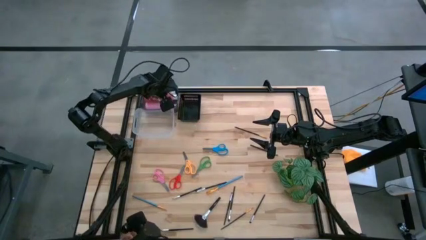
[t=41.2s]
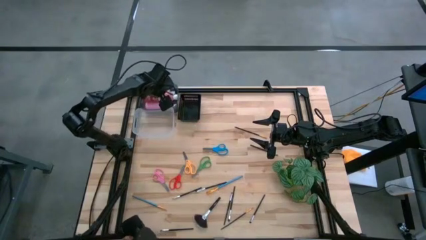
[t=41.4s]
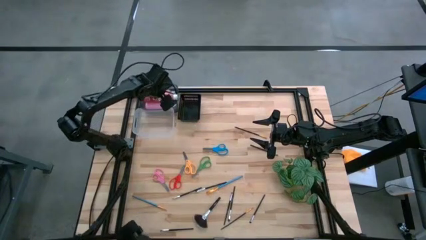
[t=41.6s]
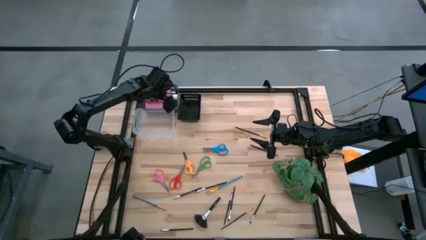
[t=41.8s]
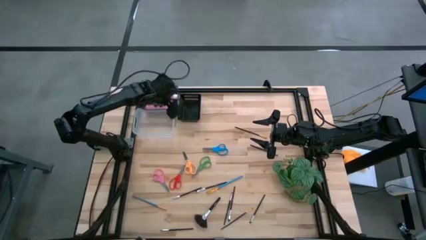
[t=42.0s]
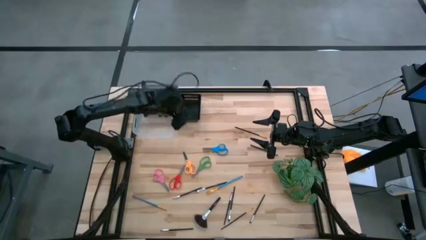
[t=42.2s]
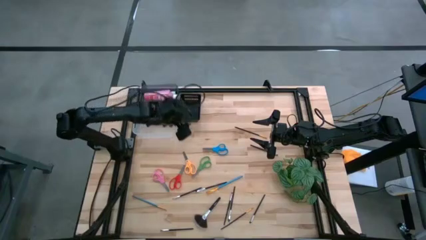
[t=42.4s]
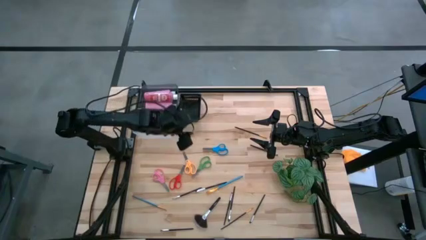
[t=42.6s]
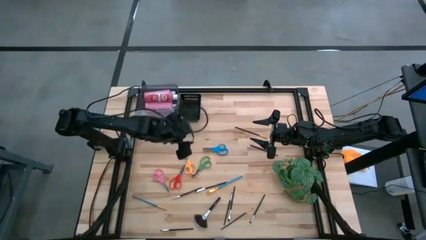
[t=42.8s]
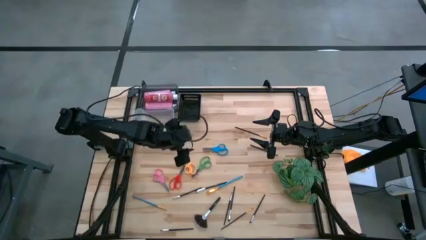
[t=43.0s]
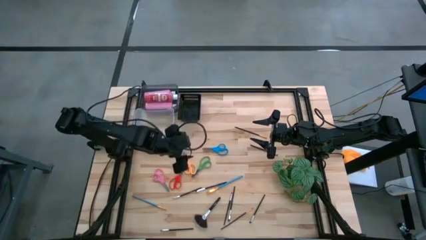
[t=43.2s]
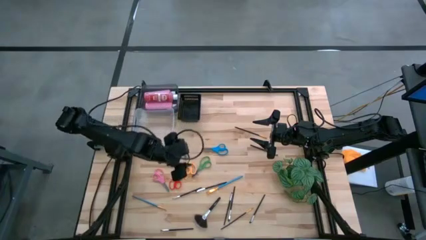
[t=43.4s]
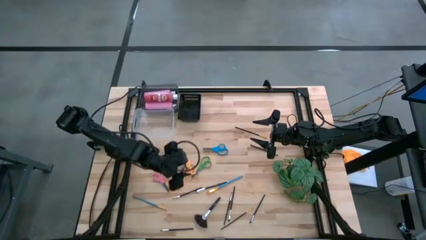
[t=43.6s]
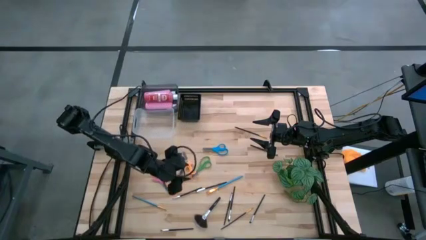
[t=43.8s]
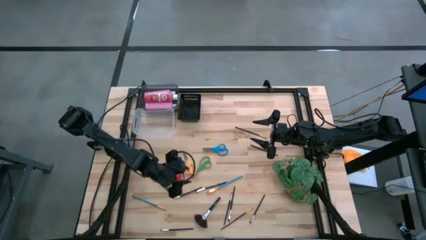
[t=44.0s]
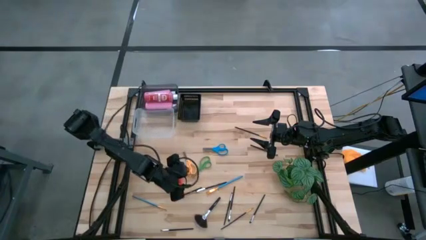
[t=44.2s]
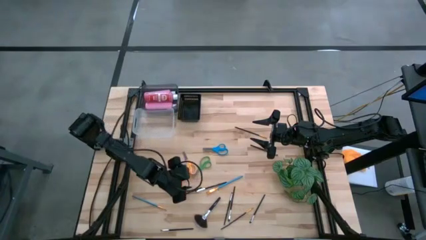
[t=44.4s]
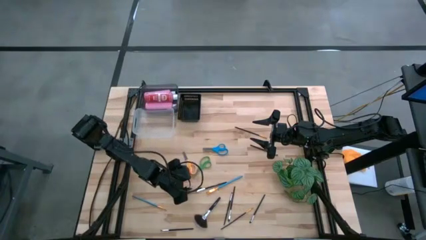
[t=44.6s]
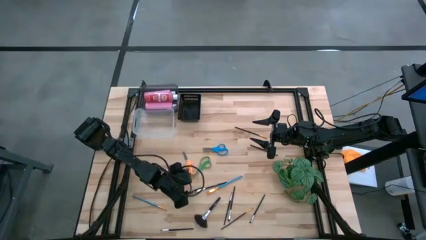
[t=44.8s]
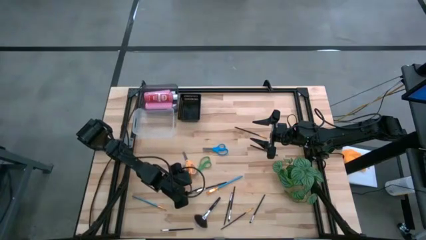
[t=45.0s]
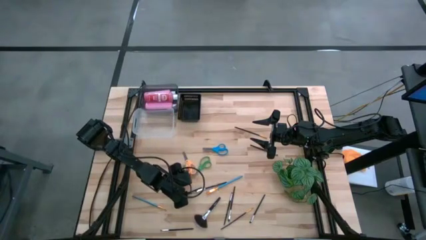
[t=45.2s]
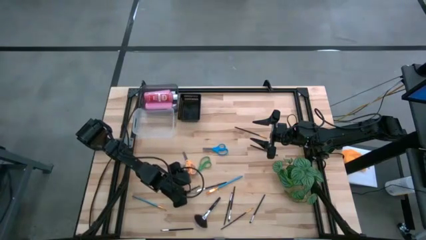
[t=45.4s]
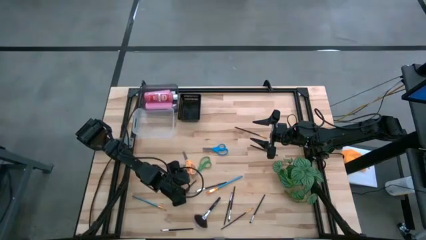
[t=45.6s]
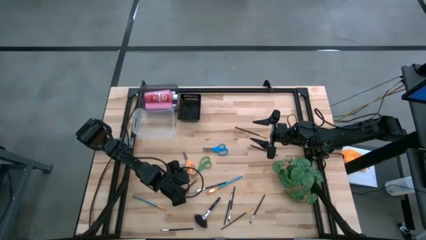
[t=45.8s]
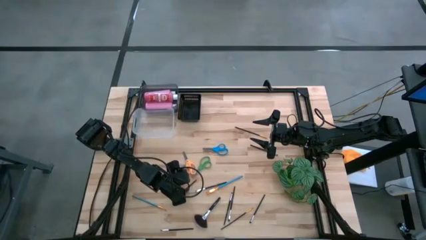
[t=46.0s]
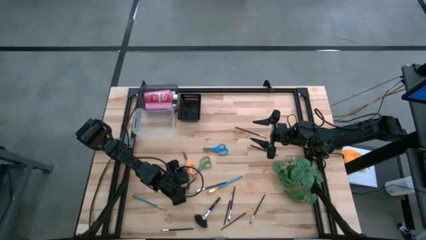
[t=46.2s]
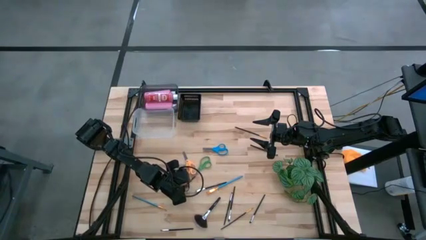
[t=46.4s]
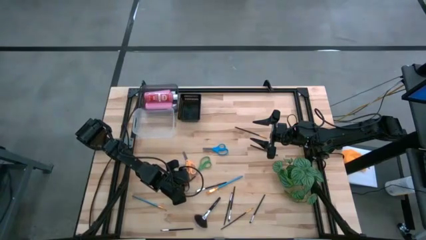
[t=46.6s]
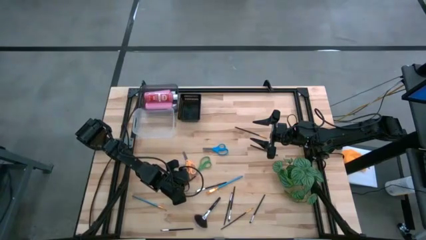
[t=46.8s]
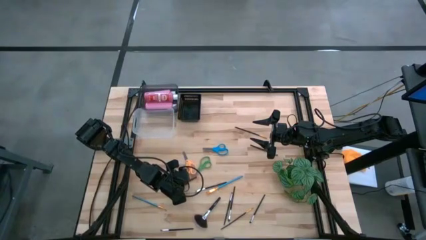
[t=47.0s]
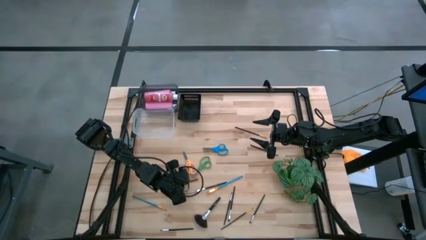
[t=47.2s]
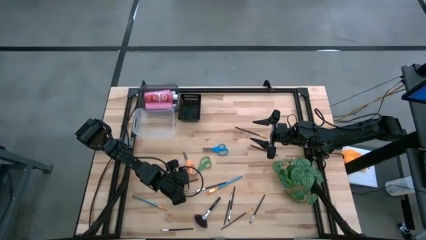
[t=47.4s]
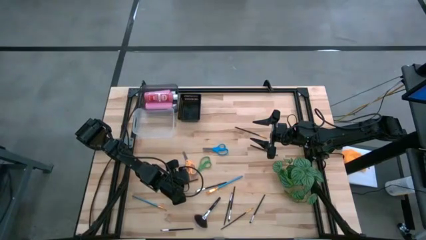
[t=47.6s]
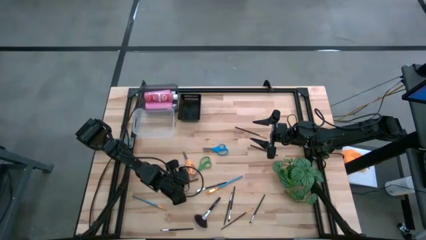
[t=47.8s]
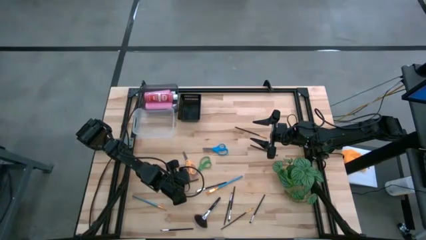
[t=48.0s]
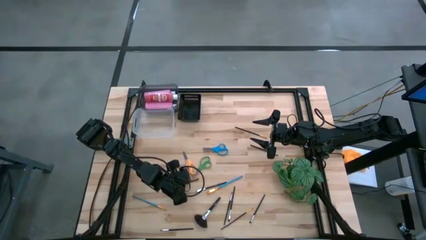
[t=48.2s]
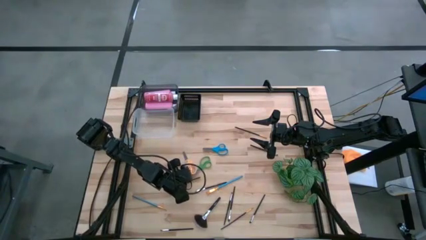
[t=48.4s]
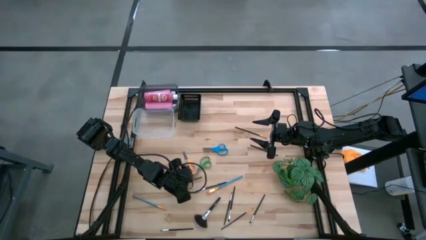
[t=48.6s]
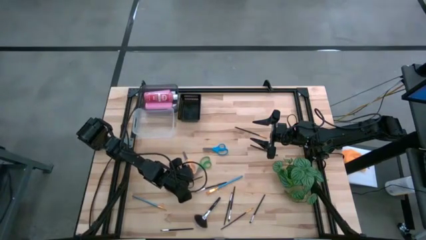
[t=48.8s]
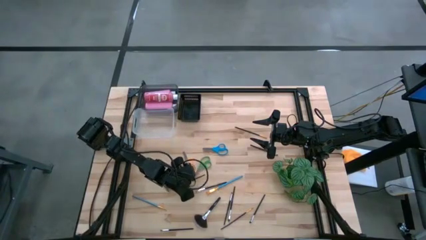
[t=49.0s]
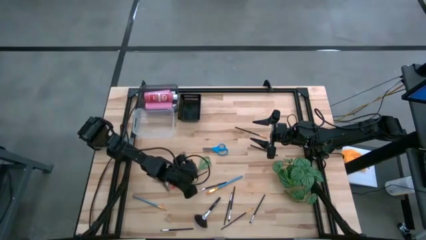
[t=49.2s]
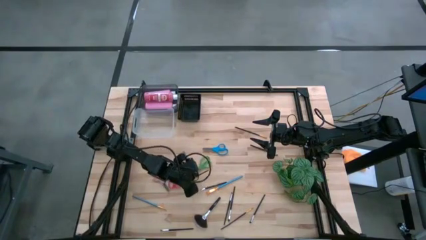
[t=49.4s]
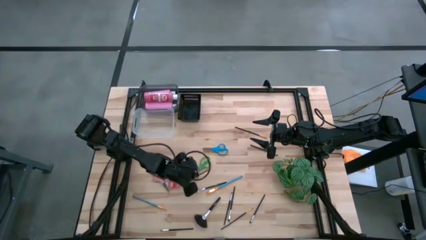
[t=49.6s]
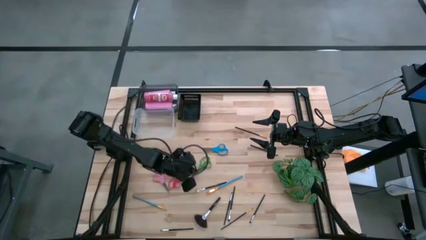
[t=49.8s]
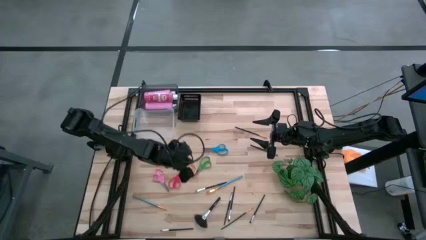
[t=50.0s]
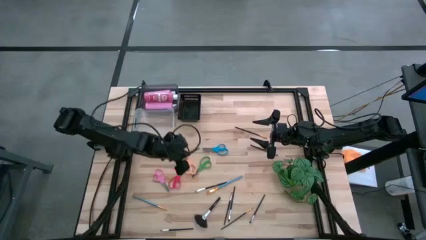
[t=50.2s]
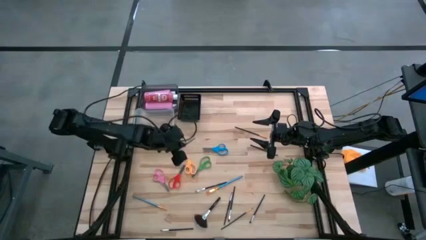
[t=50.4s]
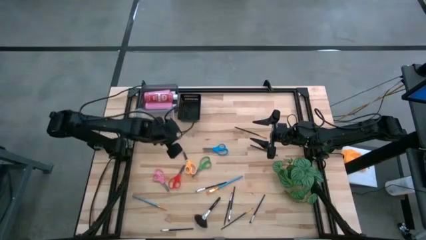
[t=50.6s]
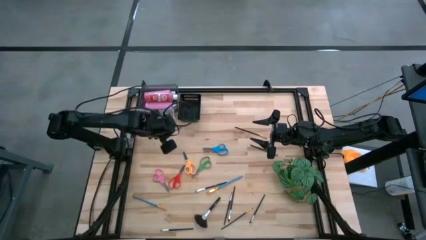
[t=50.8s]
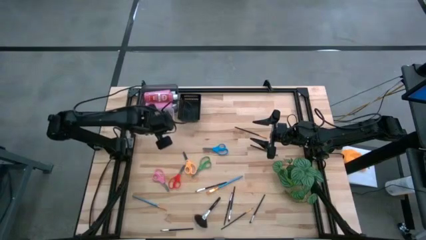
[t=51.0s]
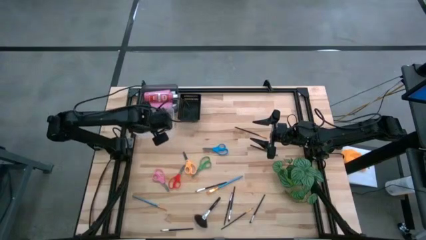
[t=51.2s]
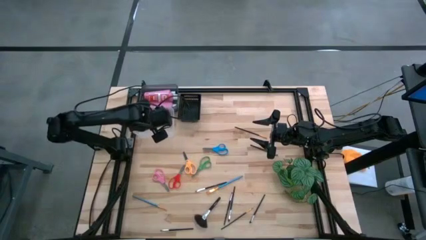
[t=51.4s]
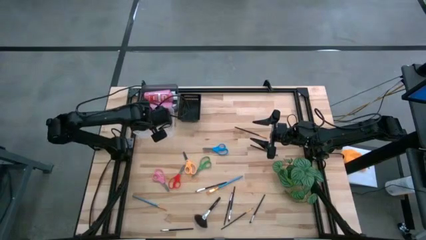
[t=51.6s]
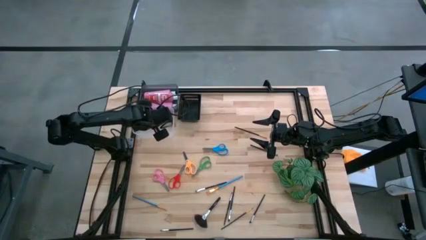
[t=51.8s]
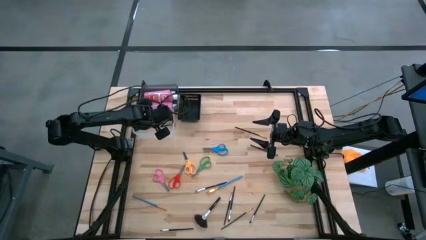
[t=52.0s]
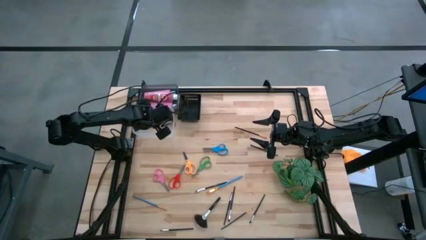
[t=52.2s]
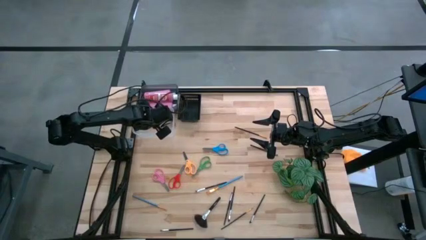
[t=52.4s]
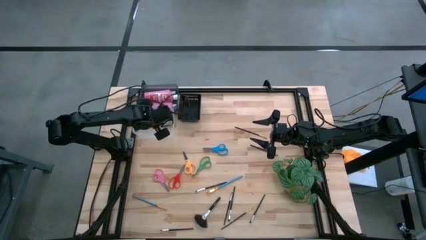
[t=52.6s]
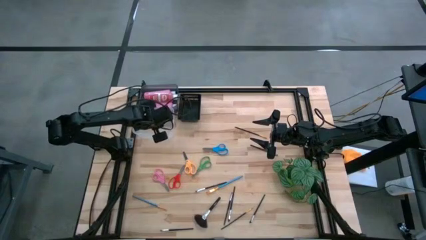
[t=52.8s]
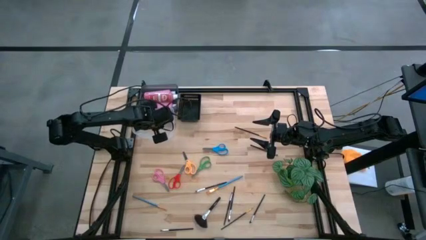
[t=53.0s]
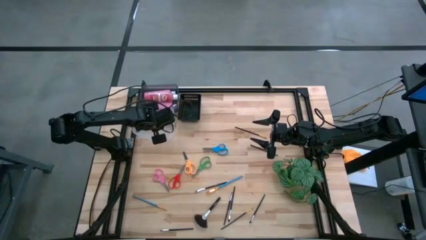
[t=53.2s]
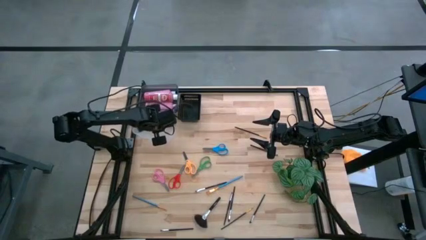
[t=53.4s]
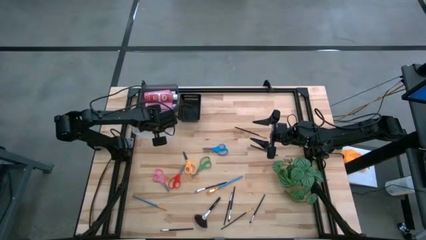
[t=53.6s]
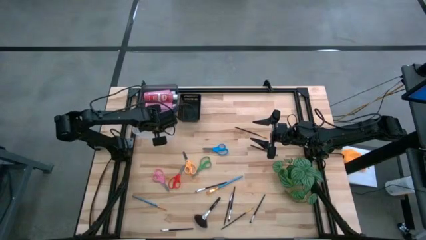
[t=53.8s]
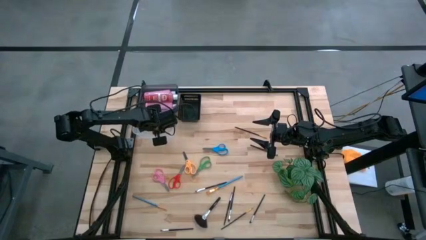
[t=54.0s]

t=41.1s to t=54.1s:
Task: Pick & Place Paint Supplies
Put the black paint brush into the transparent bin

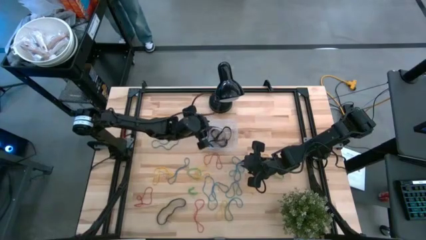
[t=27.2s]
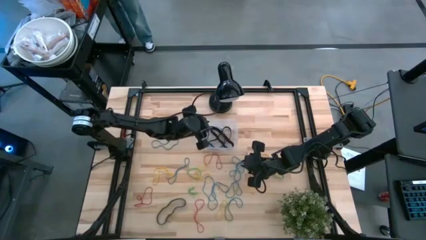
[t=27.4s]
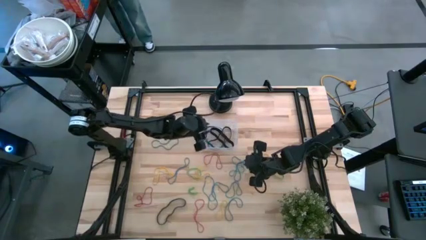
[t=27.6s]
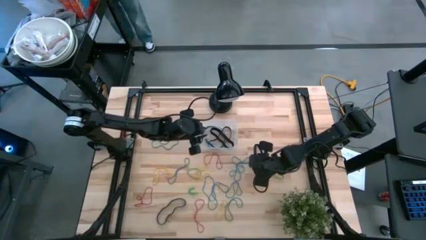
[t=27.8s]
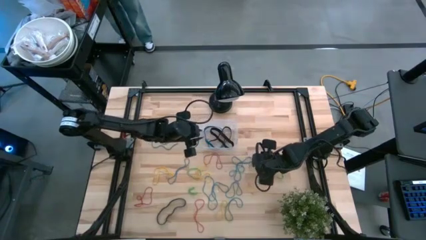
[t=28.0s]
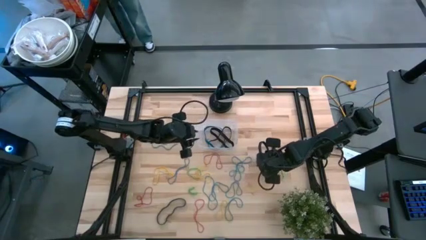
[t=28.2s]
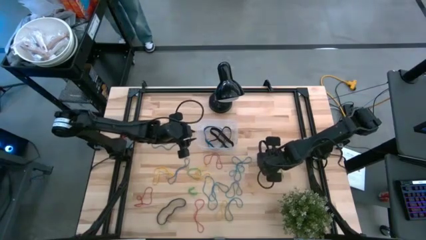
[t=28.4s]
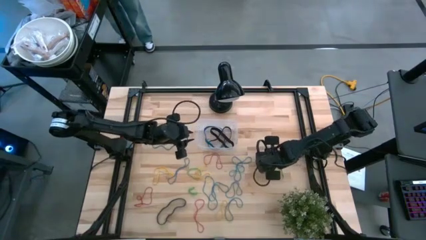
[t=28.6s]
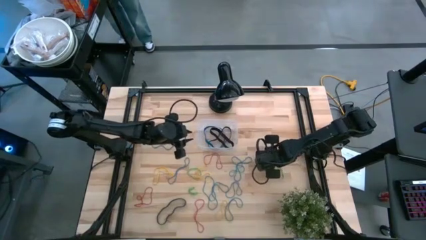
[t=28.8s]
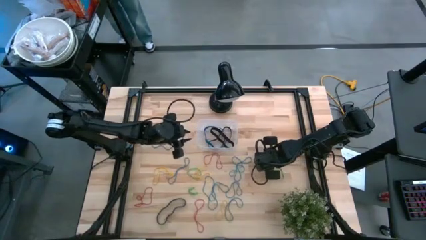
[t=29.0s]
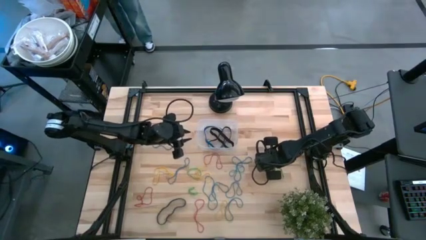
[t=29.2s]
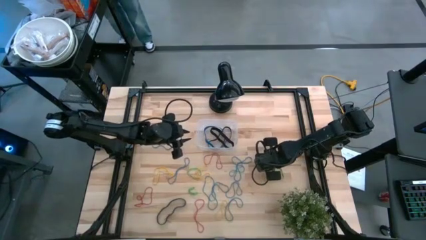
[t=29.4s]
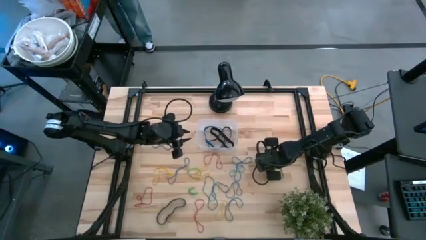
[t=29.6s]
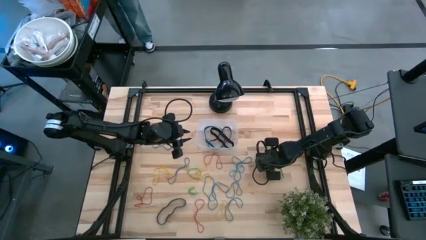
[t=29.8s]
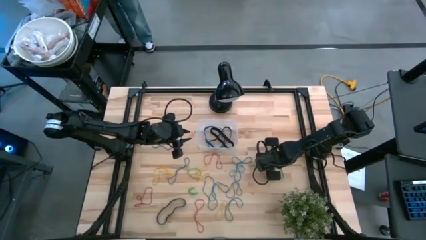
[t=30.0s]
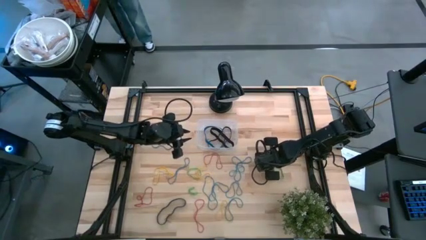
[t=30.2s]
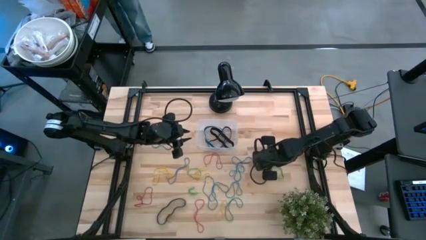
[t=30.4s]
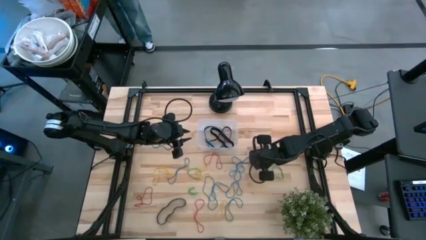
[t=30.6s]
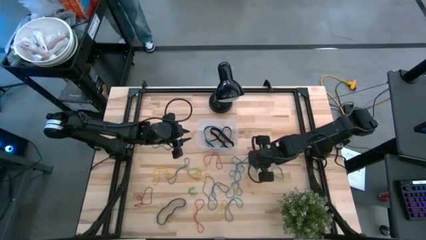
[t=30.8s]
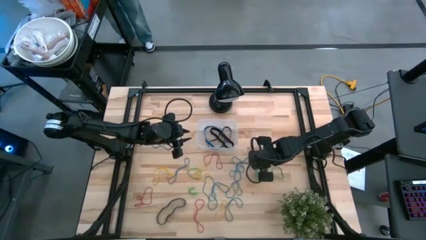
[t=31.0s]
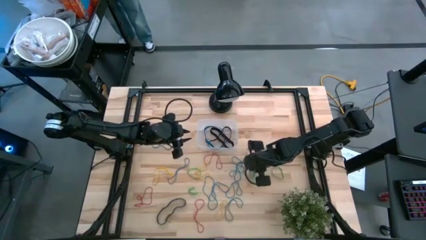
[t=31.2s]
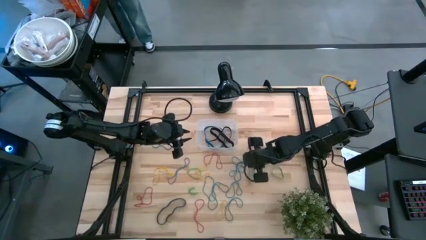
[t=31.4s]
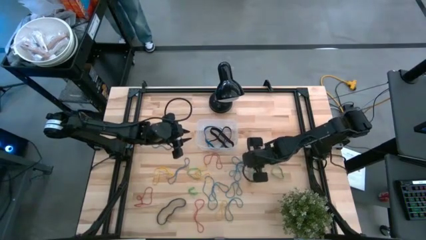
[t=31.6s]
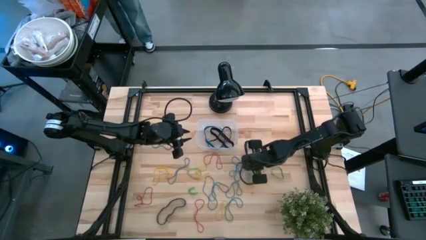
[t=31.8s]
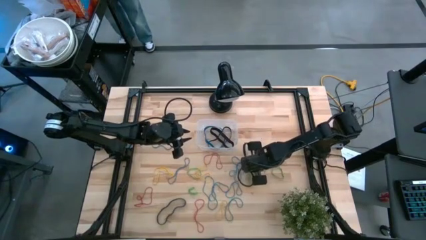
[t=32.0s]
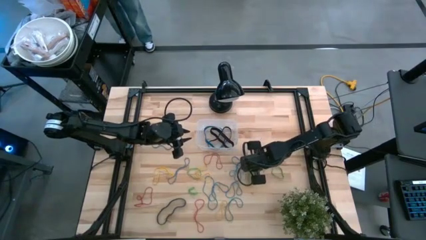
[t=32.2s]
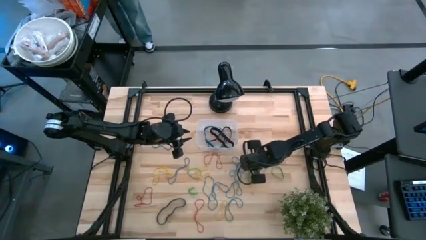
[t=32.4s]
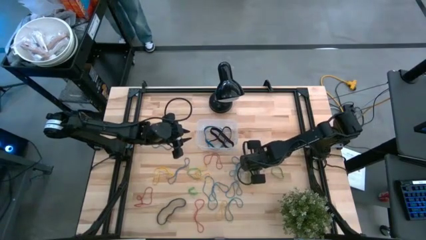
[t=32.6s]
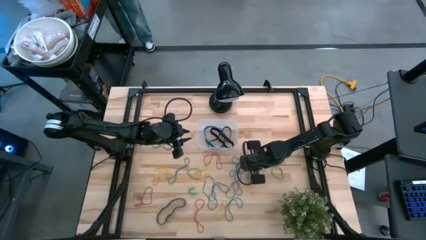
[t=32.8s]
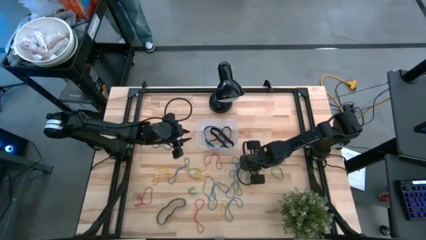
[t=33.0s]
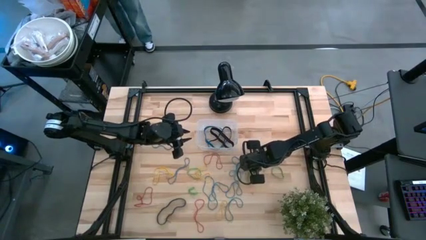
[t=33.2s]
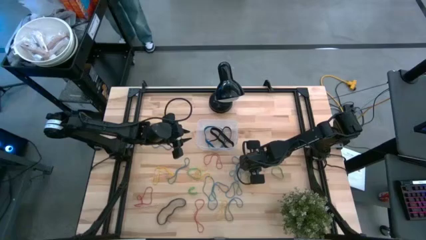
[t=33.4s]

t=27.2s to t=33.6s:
Task: Pick and place rubber bands into bin
Put the blue rubber band into the transparent bin
